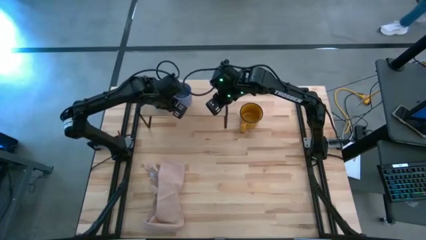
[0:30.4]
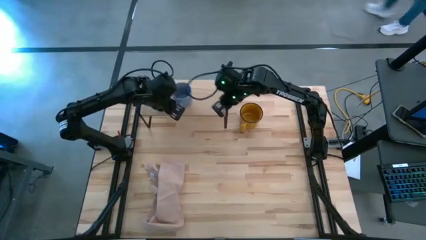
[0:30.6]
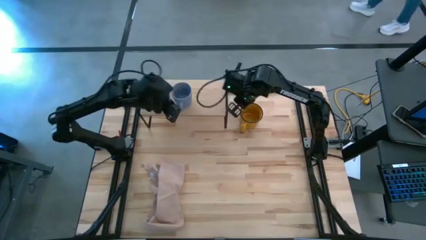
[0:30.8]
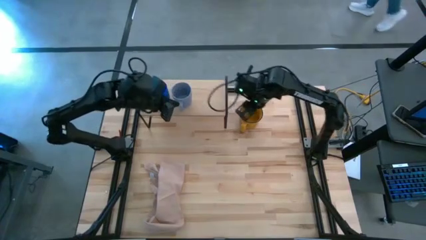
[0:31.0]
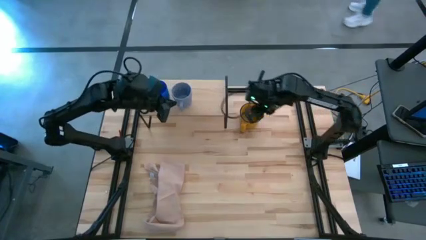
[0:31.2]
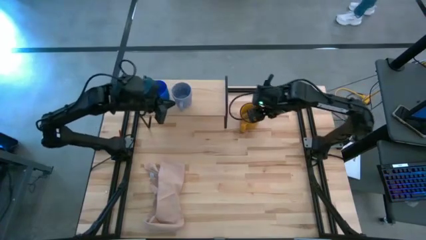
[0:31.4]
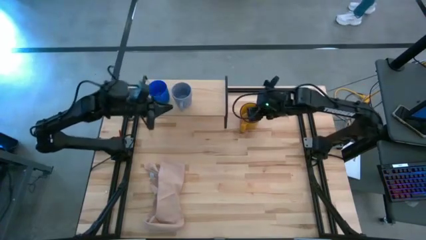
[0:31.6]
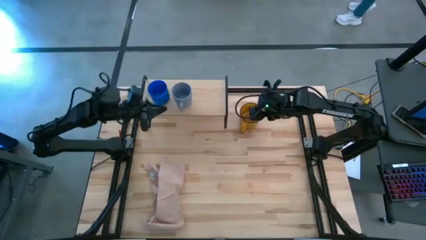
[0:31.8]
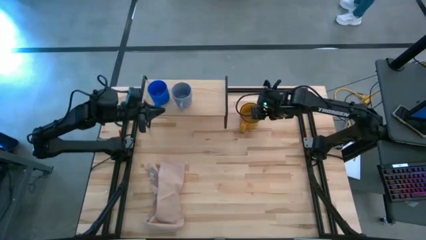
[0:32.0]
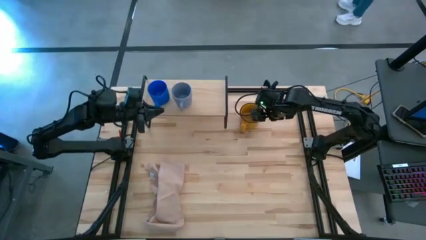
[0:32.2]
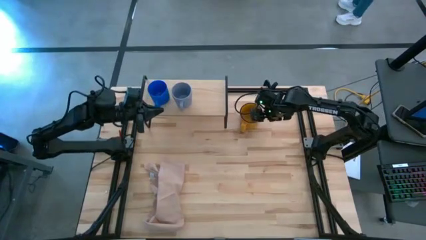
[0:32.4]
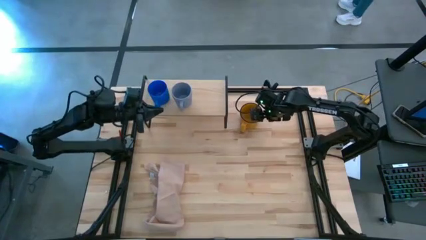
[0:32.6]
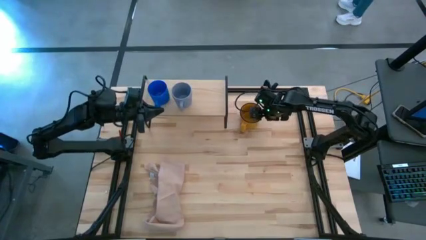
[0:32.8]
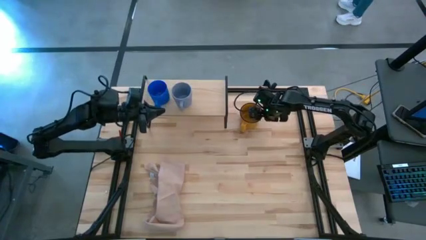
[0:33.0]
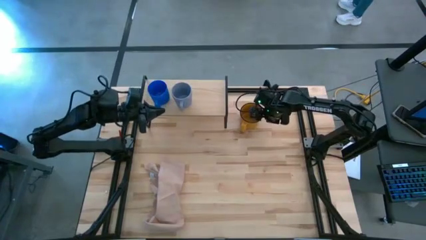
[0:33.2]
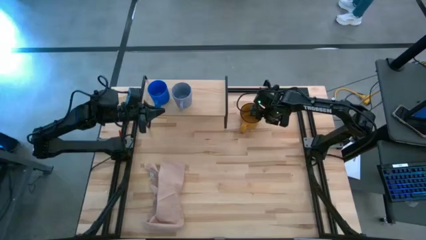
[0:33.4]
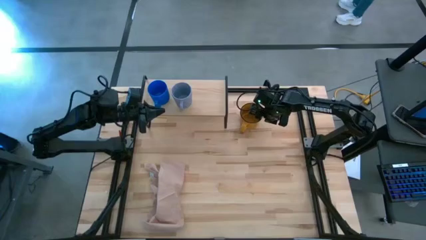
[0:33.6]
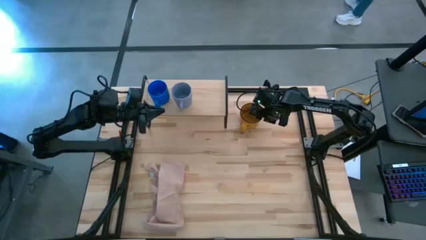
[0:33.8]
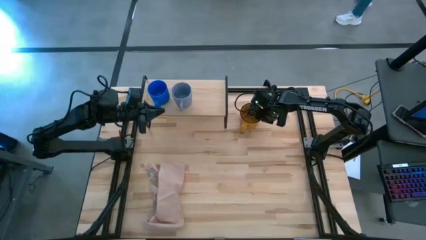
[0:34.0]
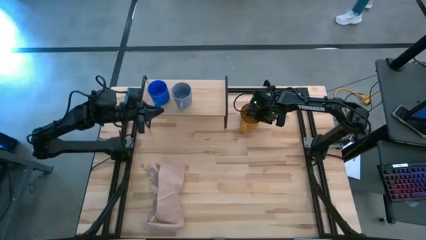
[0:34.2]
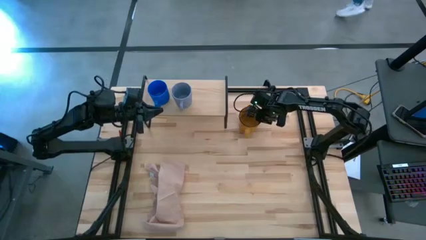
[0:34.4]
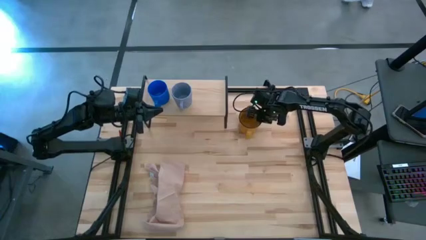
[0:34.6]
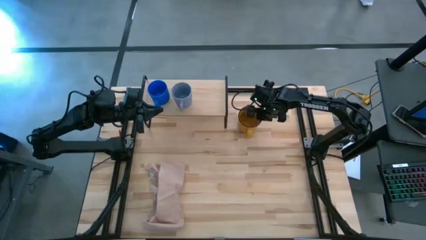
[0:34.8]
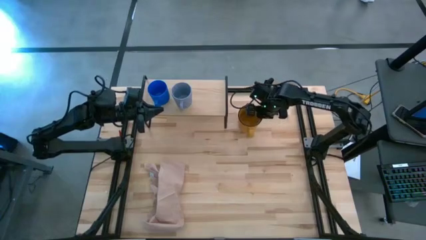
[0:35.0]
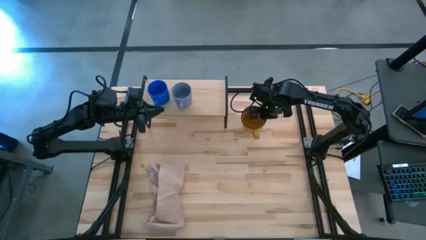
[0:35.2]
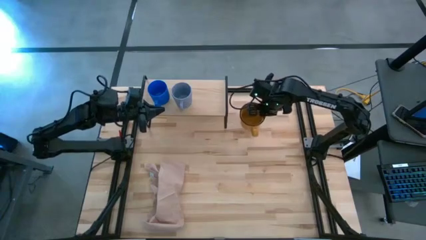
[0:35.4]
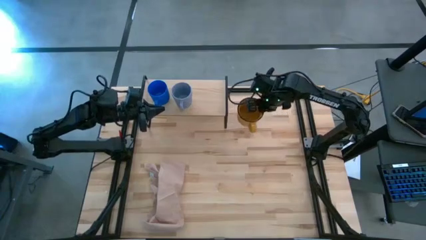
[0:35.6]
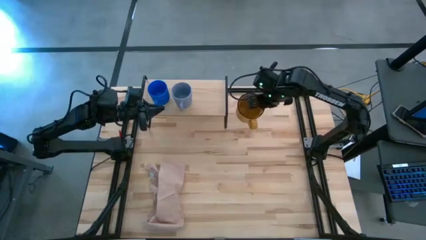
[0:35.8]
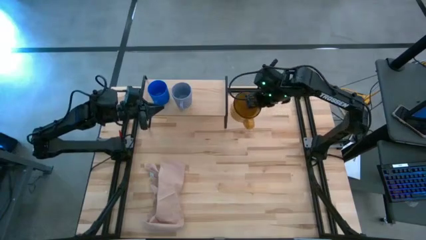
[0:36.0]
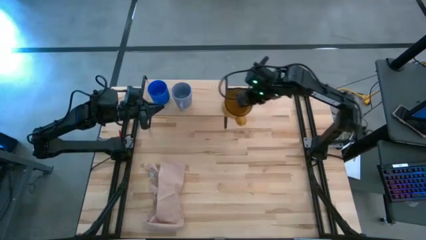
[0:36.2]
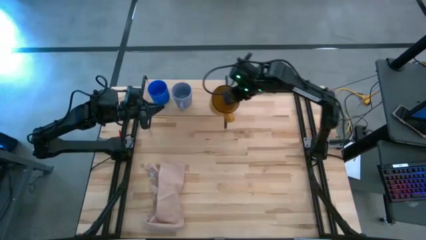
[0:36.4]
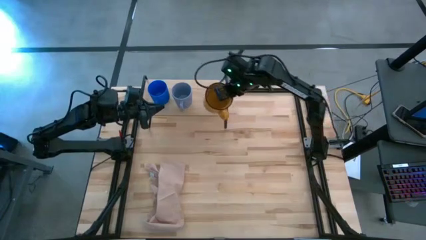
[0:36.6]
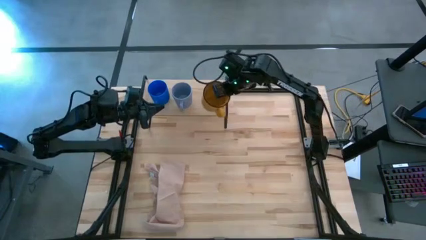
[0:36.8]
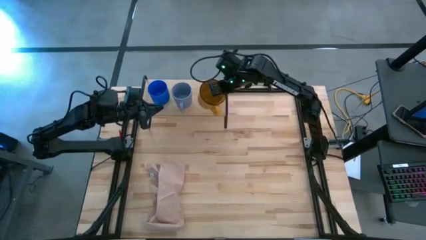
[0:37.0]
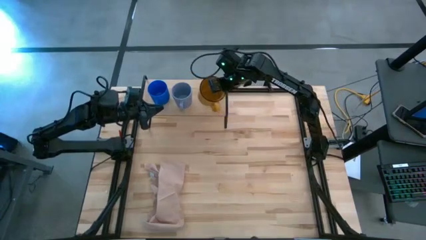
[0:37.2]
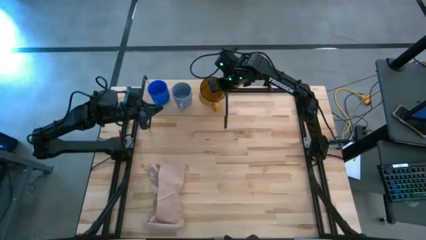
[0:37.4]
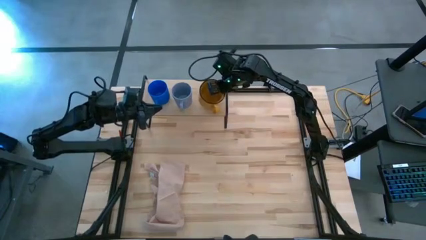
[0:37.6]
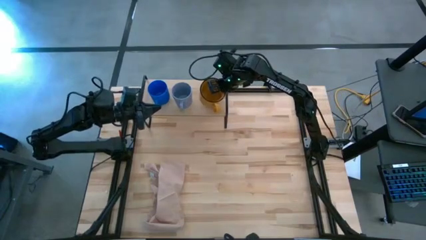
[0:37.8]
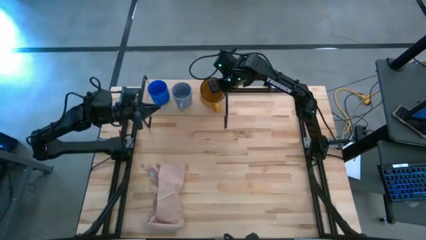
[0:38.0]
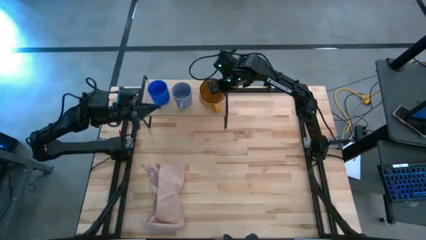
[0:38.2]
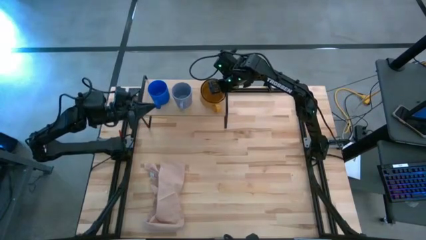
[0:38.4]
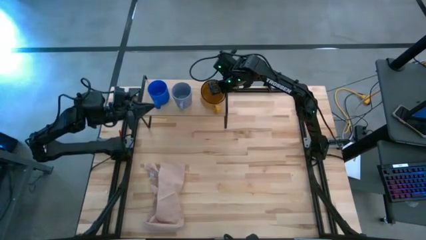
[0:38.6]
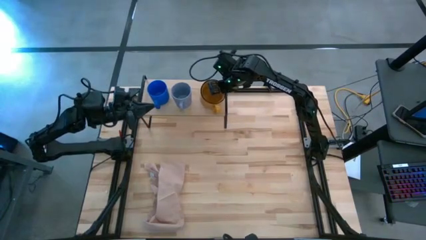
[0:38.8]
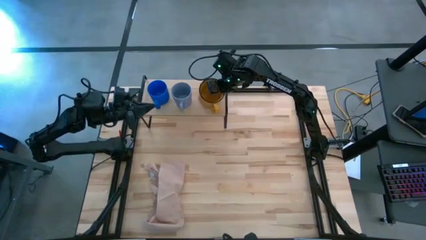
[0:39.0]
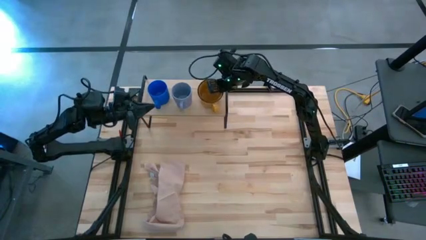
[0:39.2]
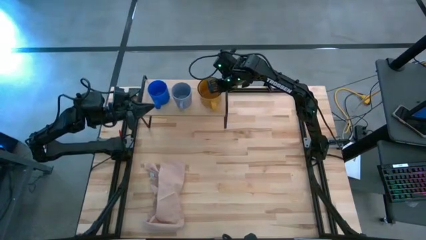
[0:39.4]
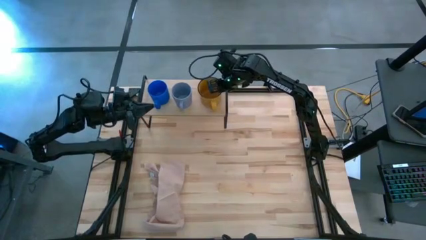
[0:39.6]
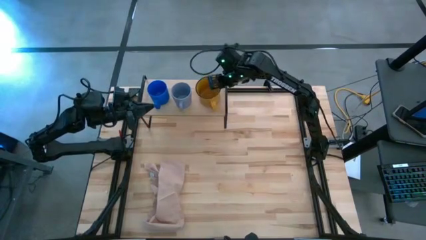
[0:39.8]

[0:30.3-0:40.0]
Task: Stack small to large cups/mugs on shelf
Put the yellow mug on the shelf

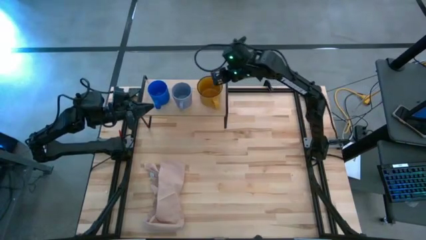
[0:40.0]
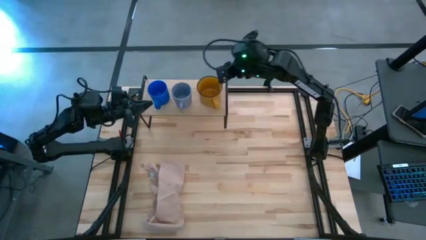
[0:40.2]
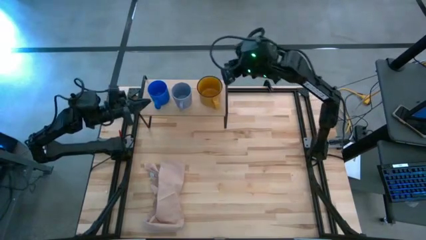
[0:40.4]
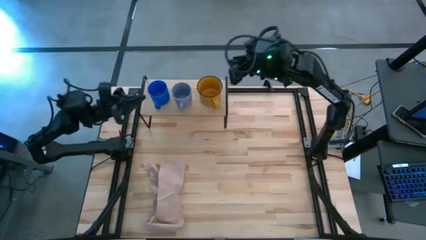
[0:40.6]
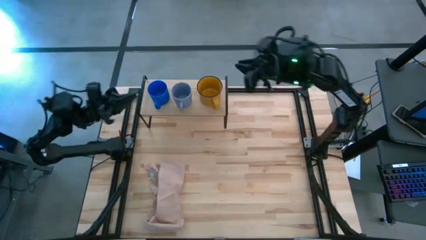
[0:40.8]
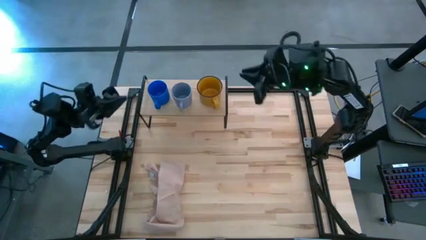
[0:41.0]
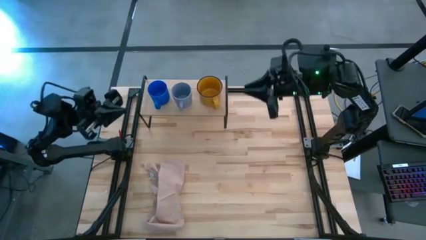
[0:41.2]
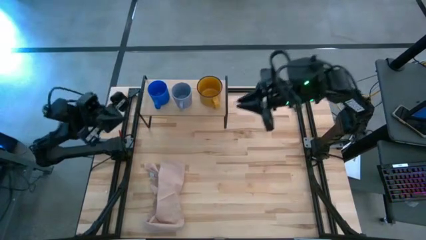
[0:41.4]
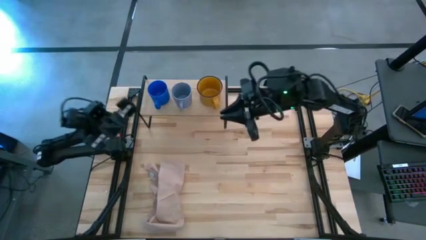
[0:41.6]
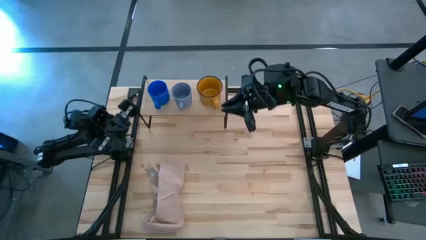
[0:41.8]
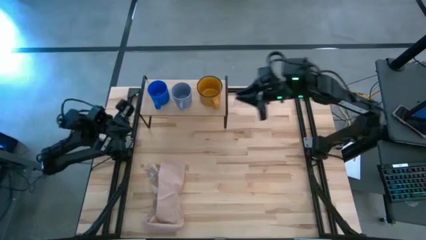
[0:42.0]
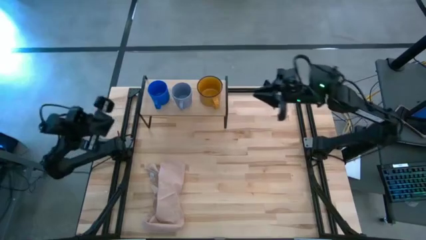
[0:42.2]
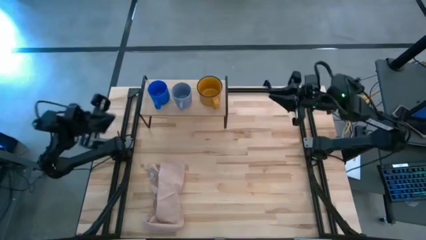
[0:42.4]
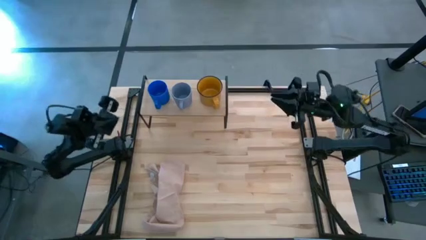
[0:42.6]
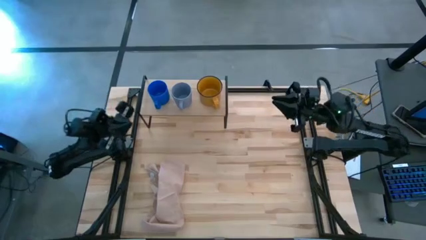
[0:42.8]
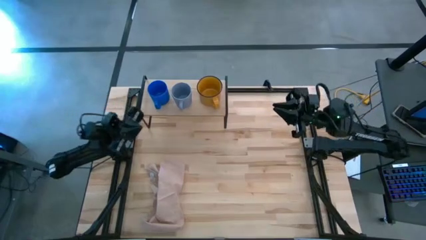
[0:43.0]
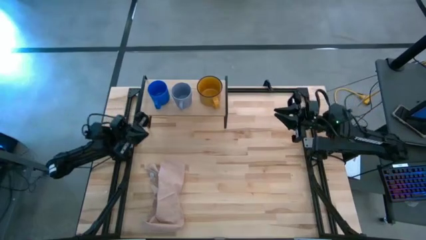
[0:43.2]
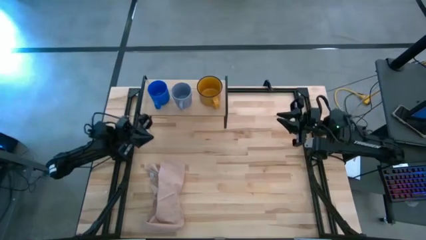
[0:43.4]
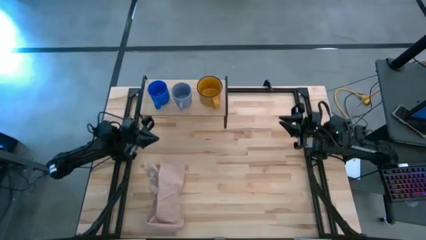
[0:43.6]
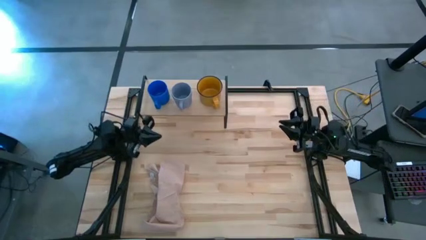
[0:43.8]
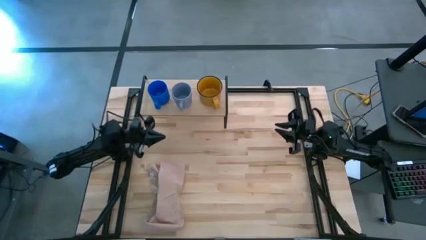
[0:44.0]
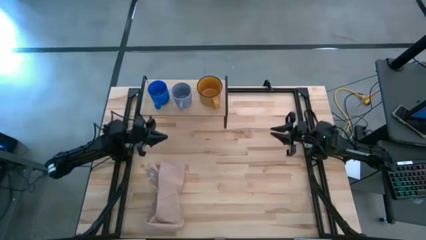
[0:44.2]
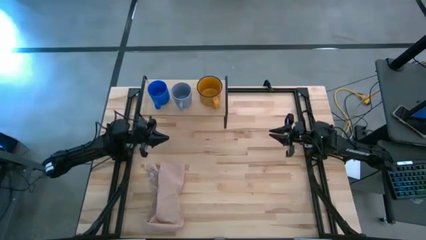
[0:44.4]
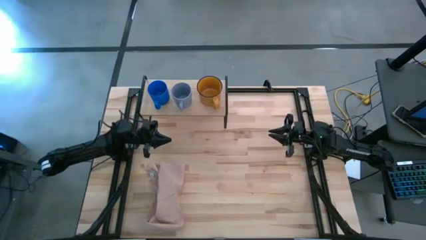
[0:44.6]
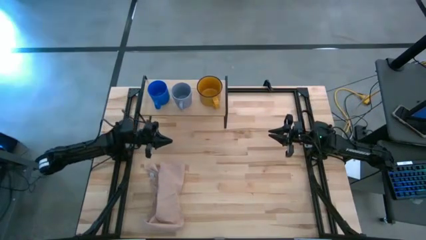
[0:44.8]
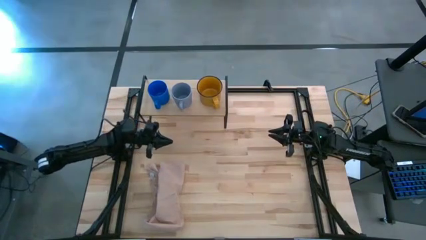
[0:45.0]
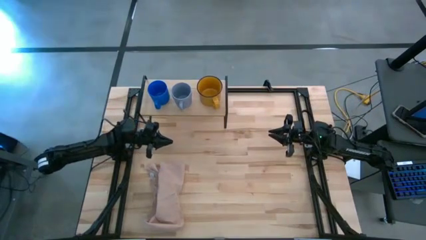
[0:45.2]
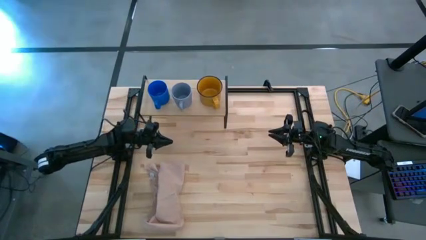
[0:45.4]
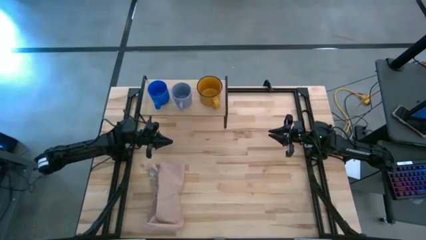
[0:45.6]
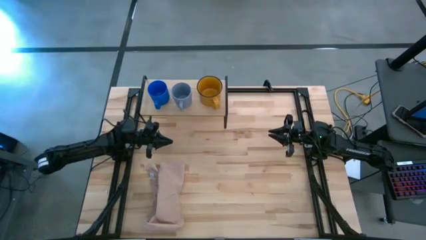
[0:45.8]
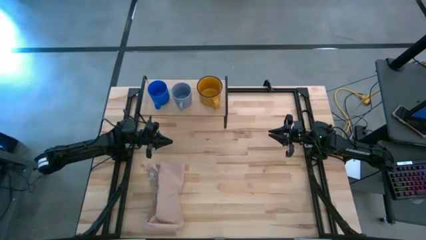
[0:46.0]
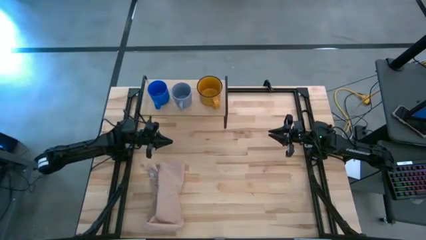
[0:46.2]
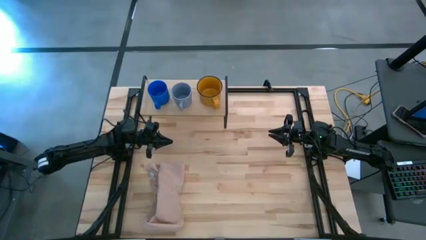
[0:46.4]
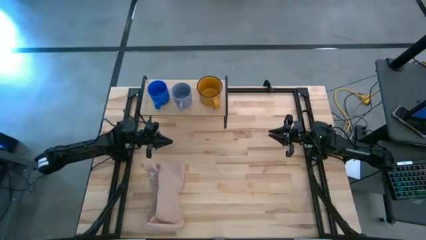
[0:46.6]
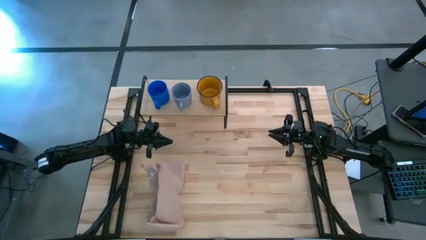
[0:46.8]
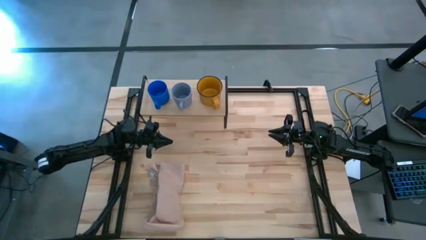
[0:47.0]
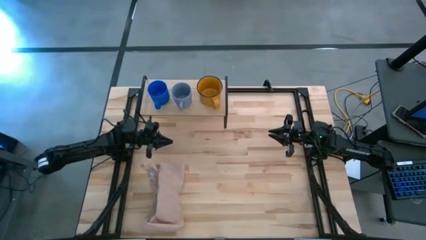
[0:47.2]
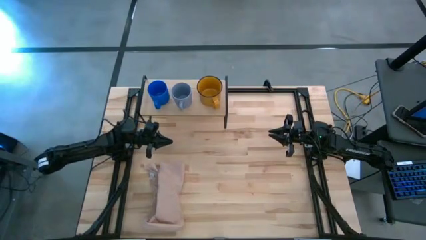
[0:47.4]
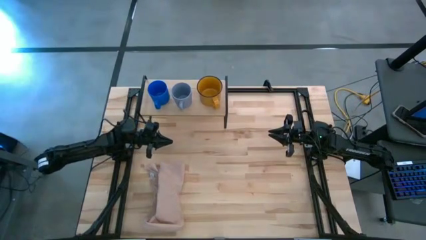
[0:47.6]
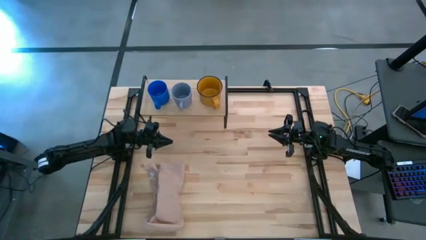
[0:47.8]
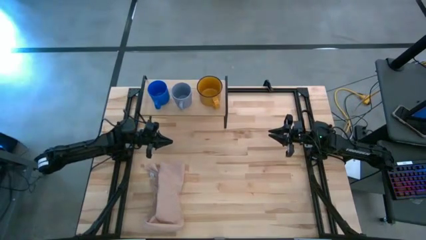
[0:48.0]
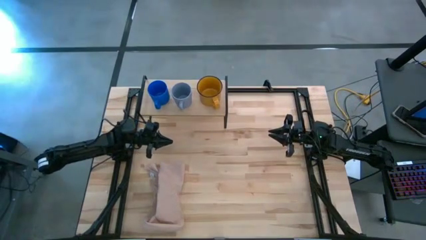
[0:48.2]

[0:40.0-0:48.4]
Return to Home Position
